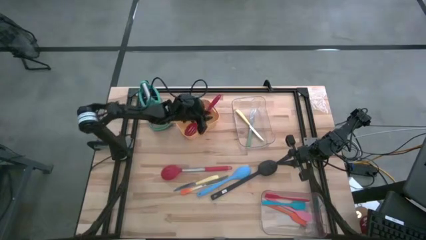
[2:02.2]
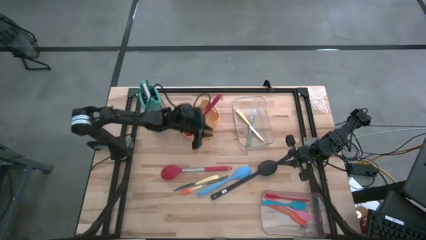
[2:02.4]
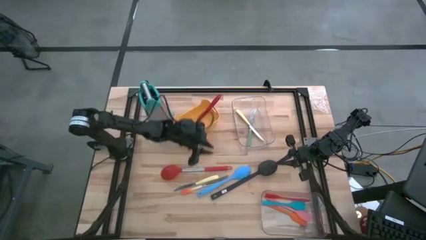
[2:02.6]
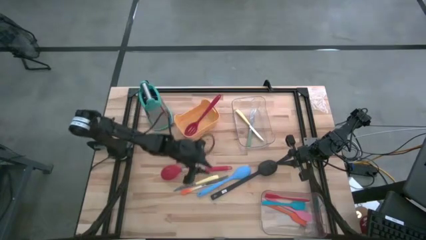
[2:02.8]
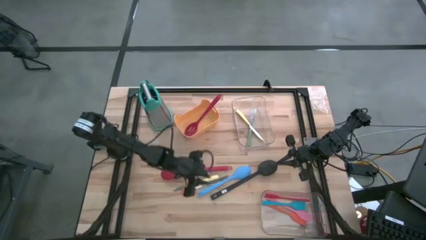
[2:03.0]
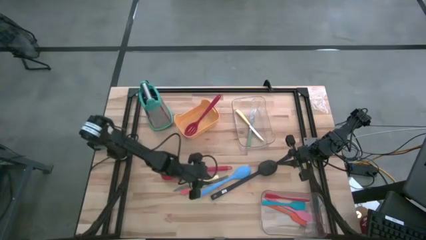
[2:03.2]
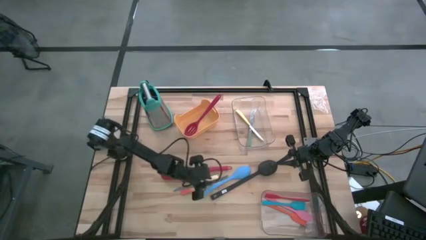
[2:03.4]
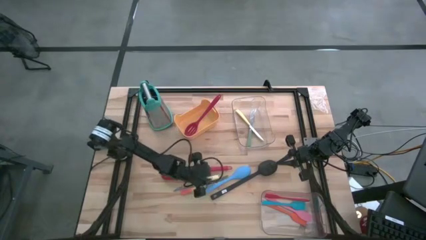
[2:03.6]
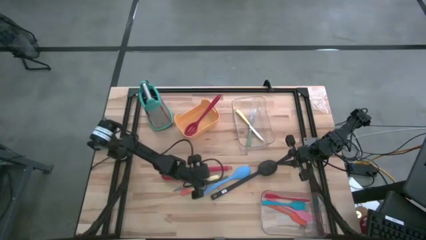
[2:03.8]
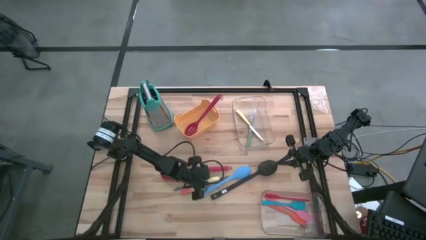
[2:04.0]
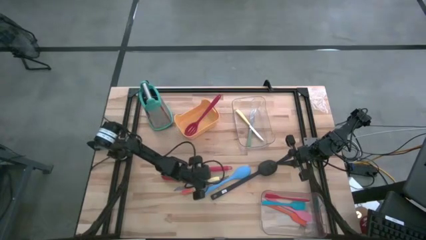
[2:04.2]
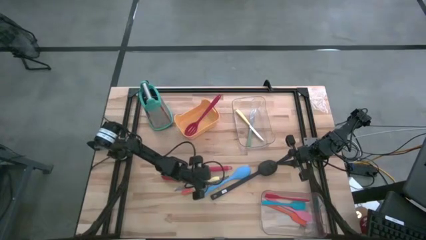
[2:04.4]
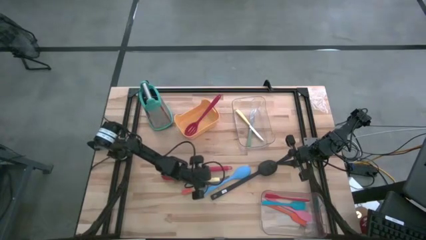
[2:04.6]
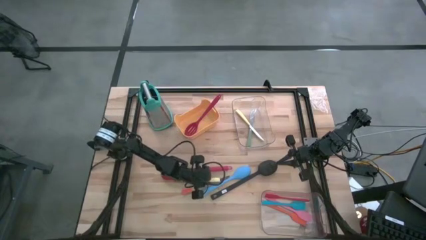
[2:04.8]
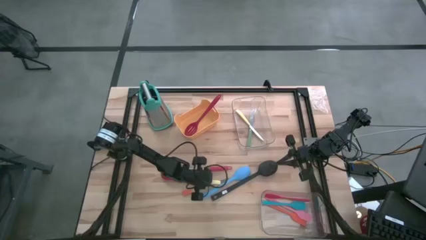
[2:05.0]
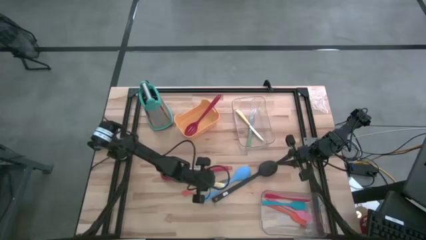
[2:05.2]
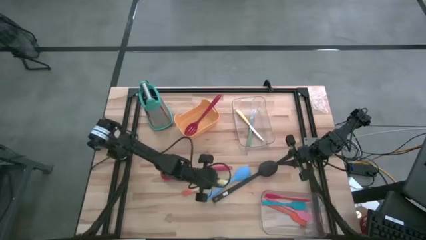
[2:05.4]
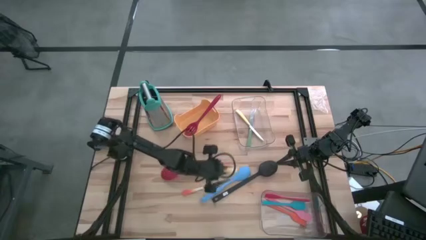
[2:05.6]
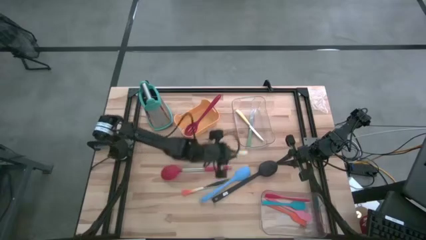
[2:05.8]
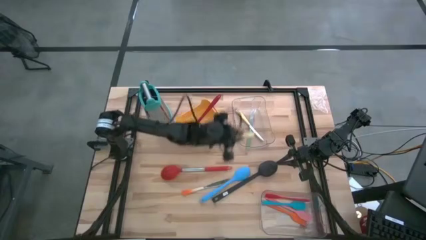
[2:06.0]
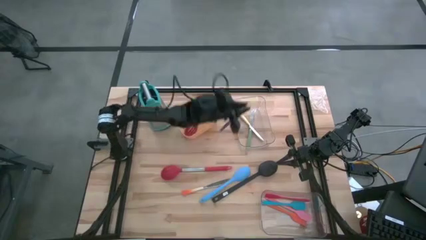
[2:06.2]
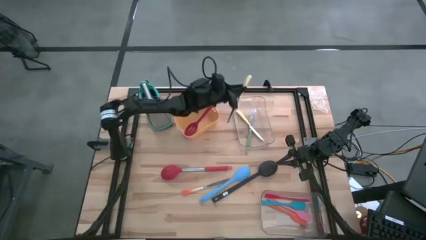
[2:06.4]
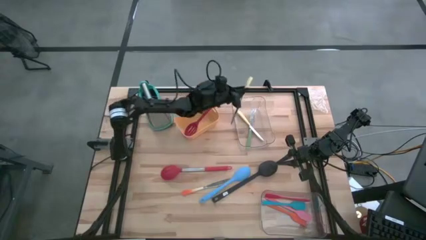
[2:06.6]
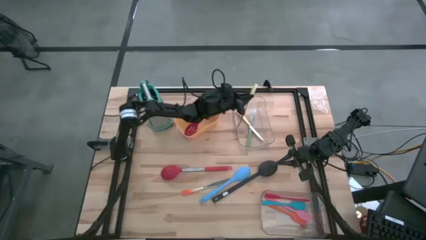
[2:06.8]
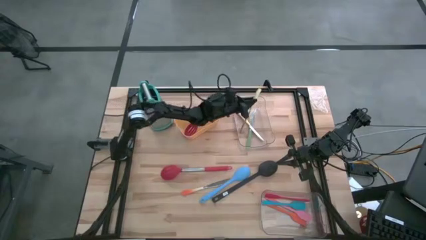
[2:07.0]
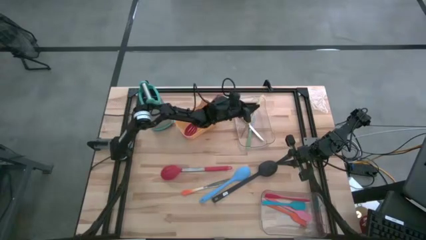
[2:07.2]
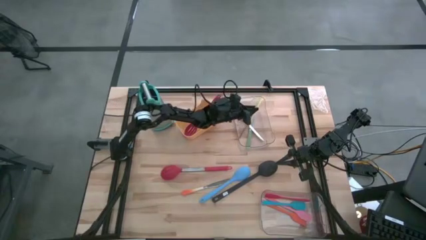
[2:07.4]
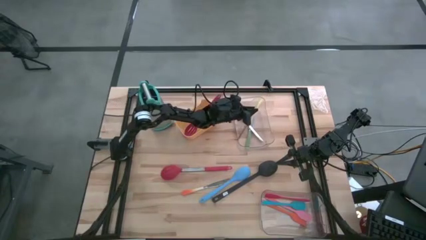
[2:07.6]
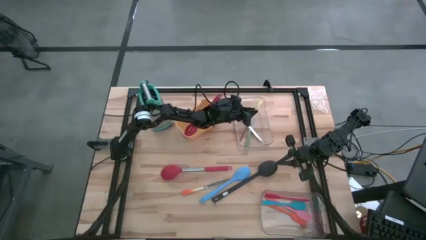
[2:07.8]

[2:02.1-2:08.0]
Task: Pick & Place Kitchen Items
Put the yellow kitchen knife into the top transparent bin

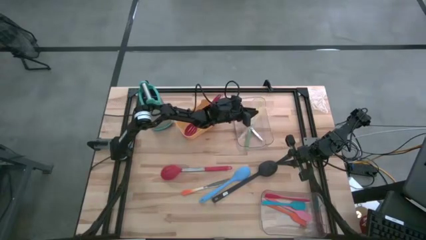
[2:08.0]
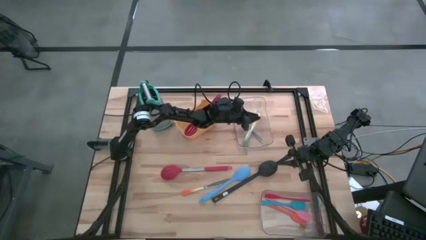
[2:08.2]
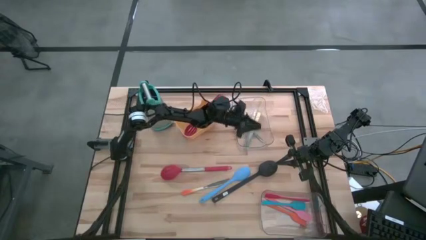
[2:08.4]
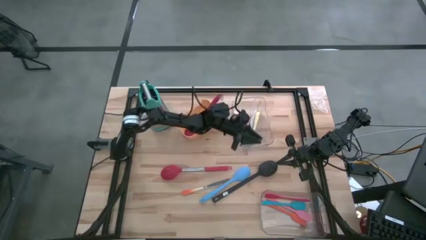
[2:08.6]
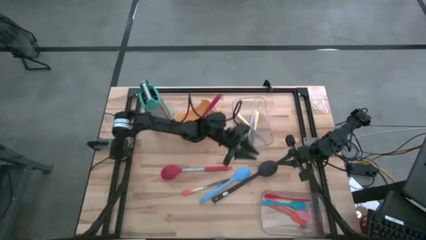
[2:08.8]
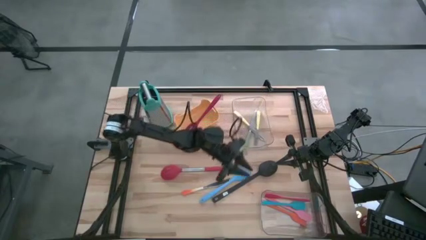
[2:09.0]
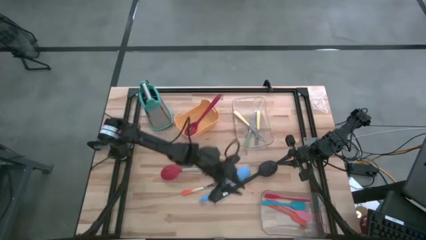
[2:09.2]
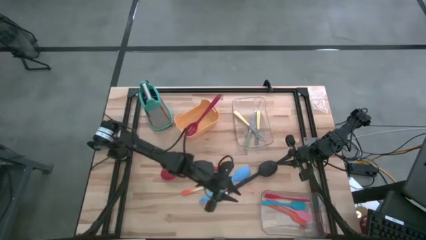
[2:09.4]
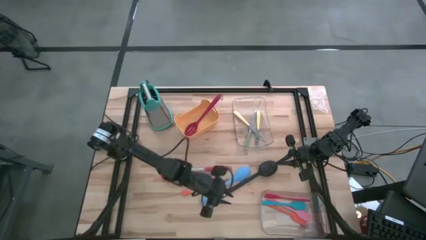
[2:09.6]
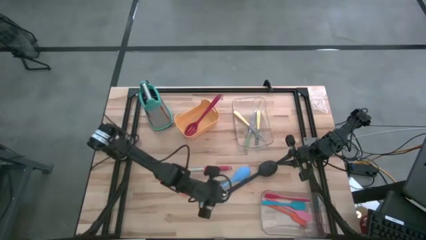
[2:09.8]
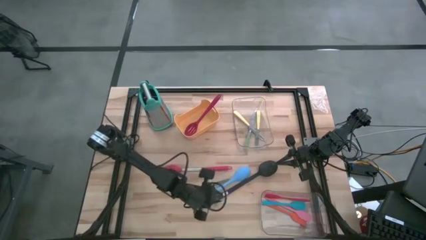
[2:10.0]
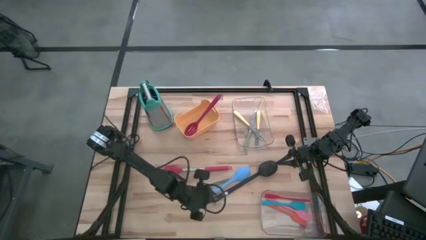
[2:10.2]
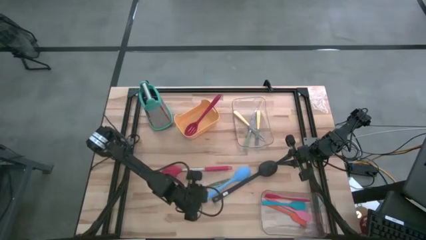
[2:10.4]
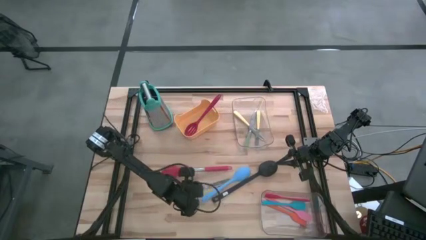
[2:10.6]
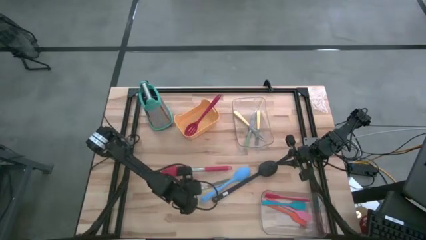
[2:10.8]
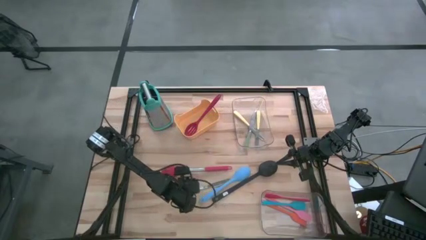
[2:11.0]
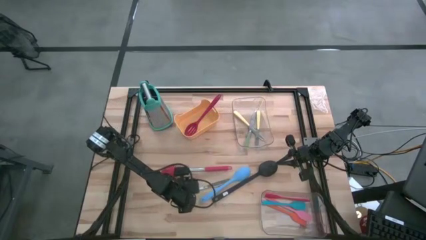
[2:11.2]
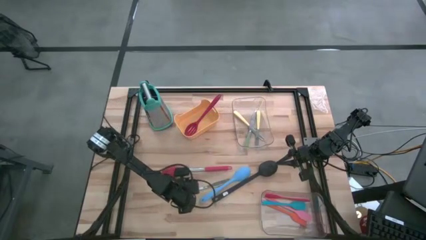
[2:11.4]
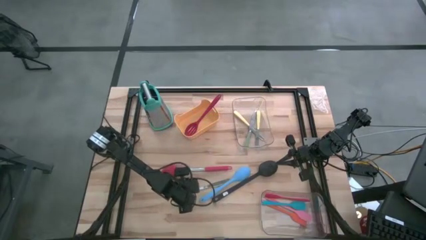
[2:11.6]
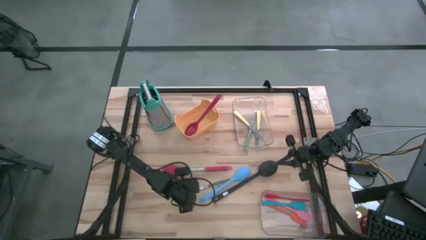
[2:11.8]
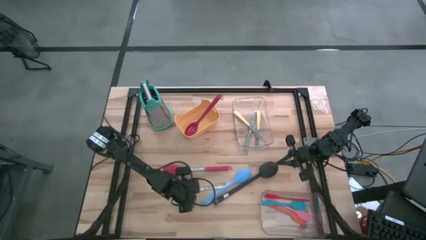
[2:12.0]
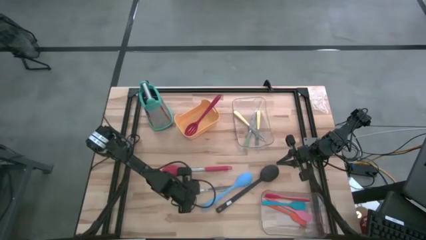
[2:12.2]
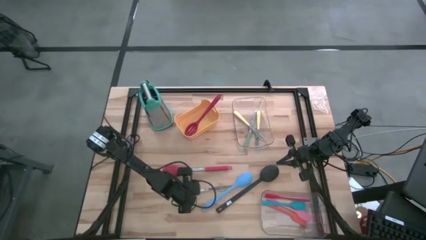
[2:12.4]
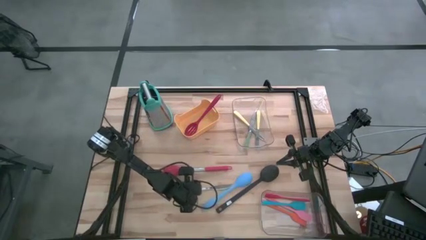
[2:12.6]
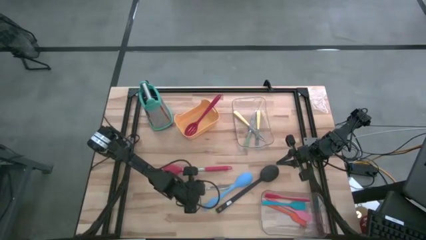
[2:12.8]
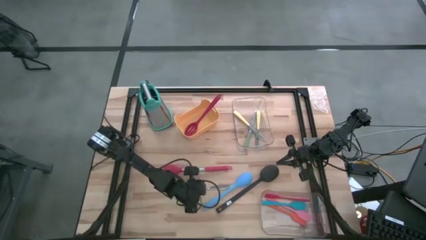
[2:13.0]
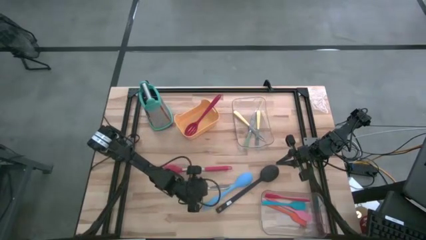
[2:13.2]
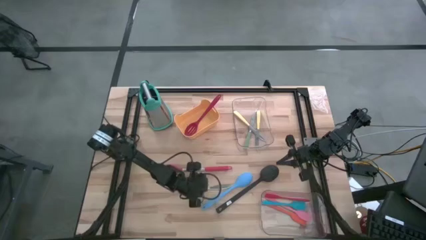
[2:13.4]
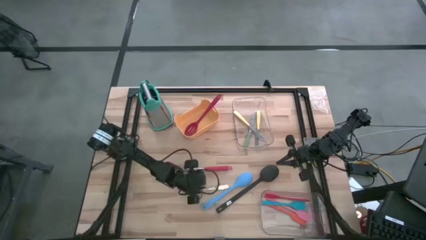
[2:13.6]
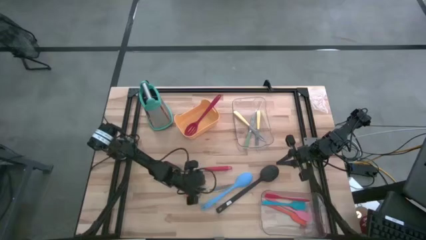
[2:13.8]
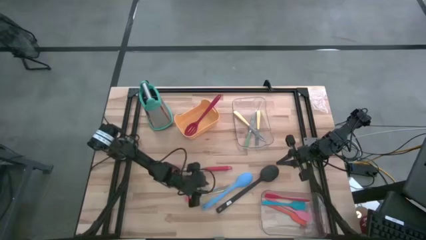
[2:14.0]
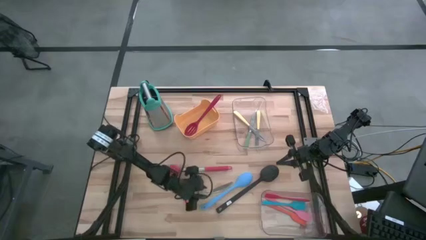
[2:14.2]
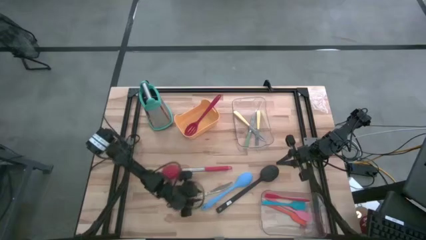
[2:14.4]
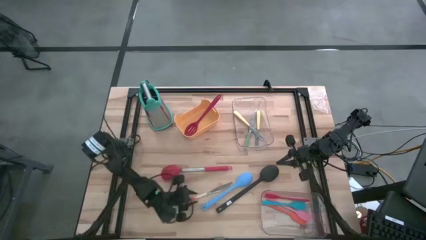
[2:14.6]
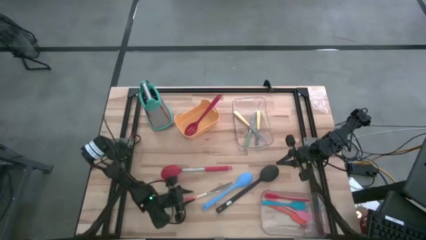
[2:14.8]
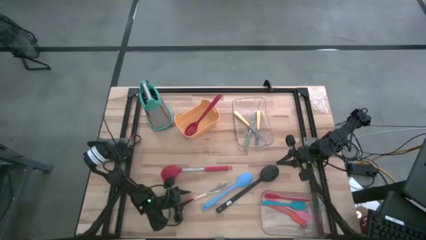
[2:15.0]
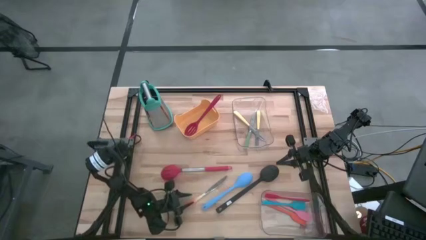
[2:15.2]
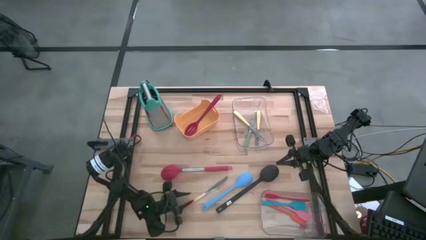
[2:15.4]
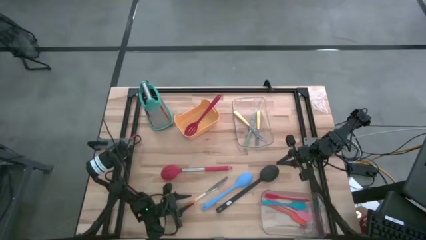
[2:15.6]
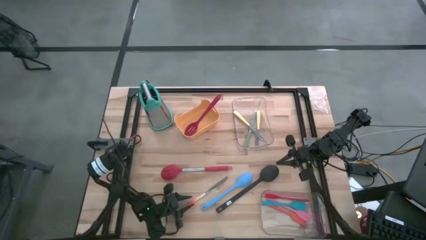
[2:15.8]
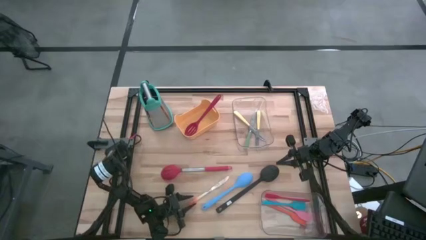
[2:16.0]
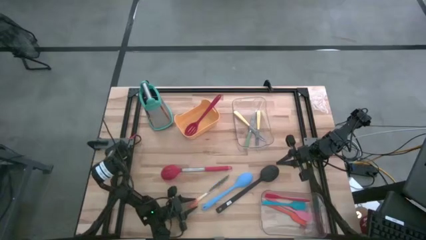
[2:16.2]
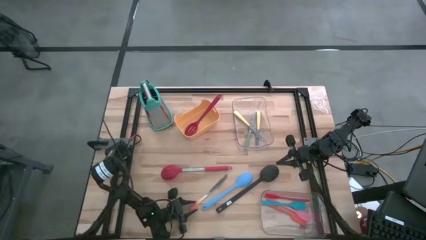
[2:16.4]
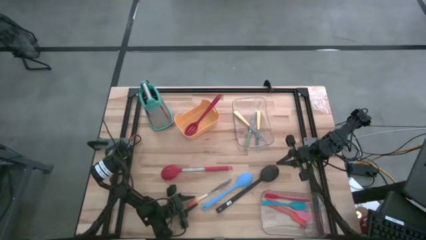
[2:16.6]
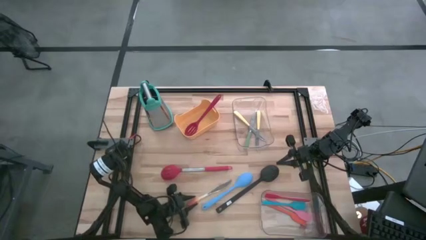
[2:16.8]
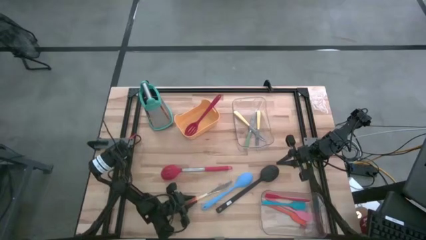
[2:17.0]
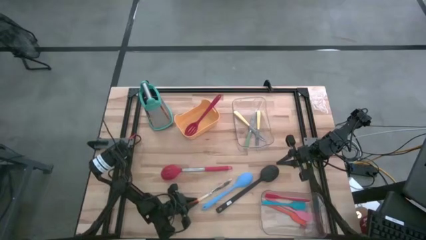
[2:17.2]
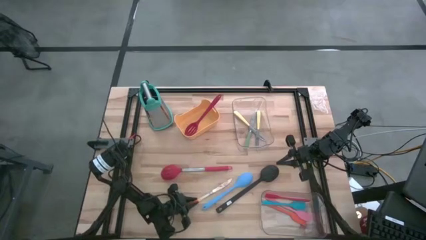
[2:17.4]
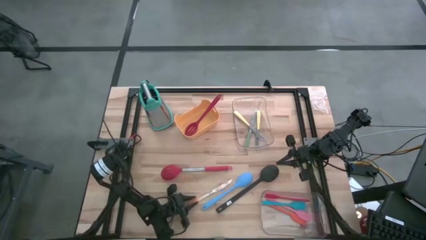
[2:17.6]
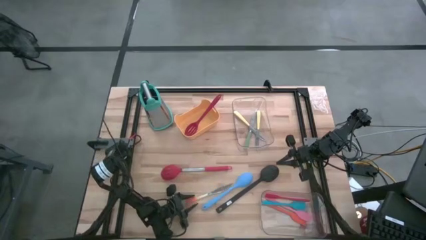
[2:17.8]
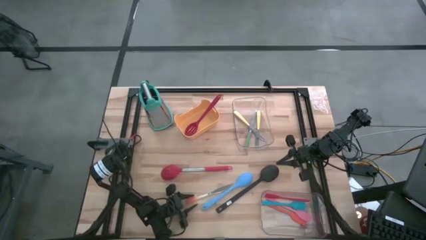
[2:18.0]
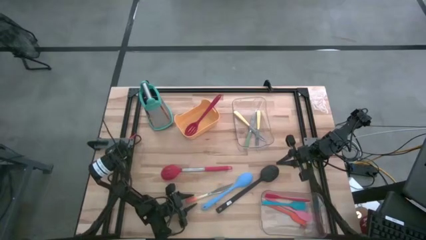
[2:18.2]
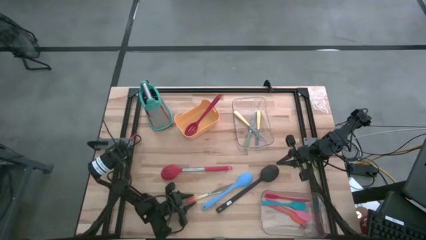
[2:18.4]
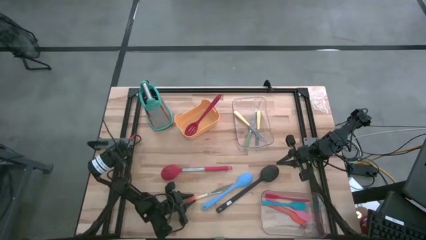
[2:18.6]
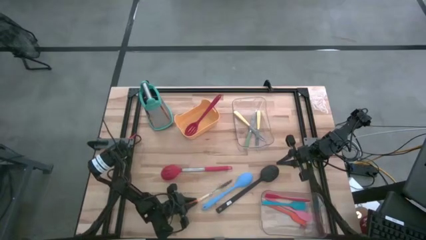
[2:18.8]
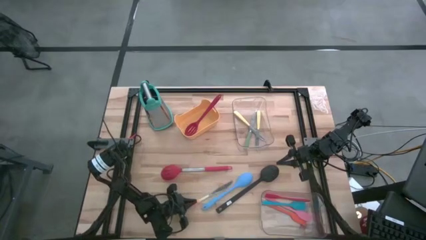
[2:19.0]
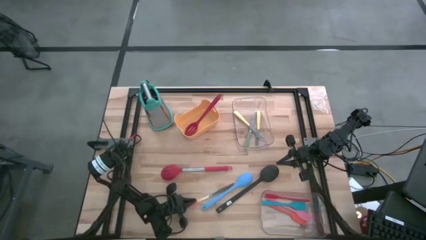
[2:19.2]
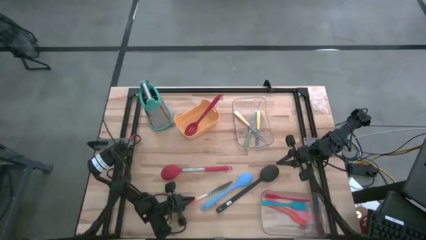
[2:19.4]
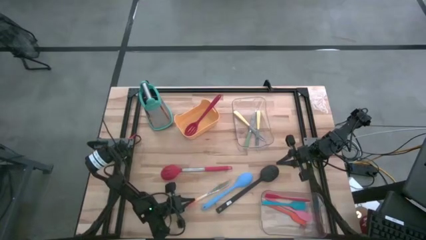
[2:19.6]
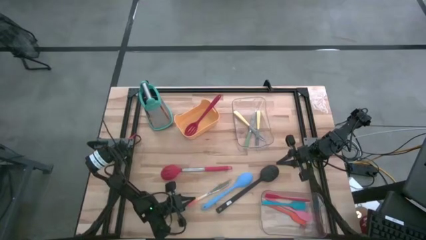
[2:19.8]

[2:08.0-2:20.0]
Put the orange kitchen knife into the top transparent bin
